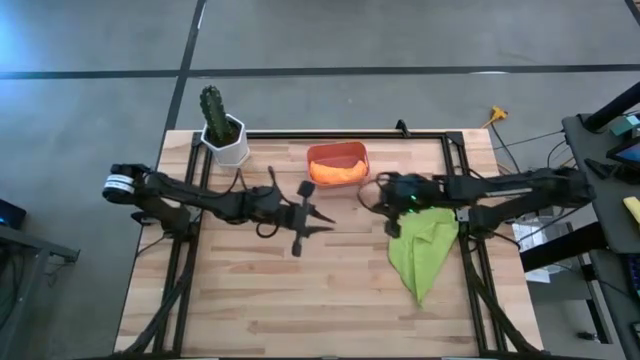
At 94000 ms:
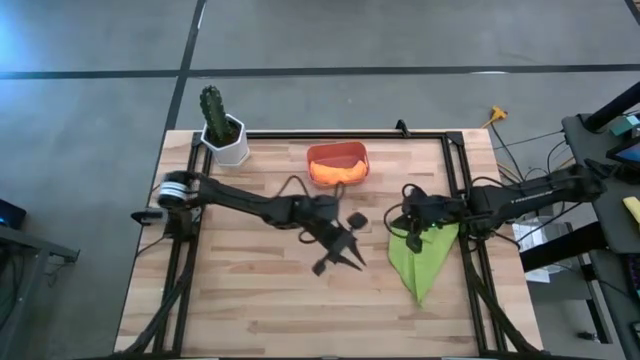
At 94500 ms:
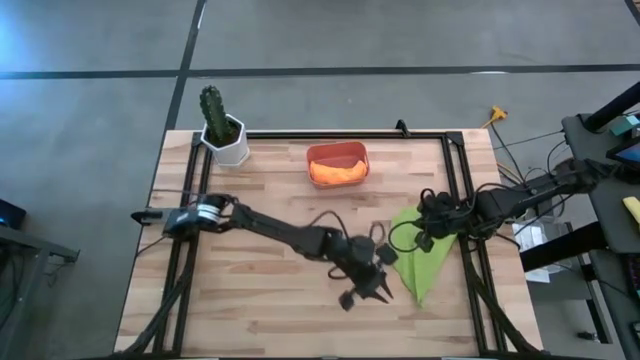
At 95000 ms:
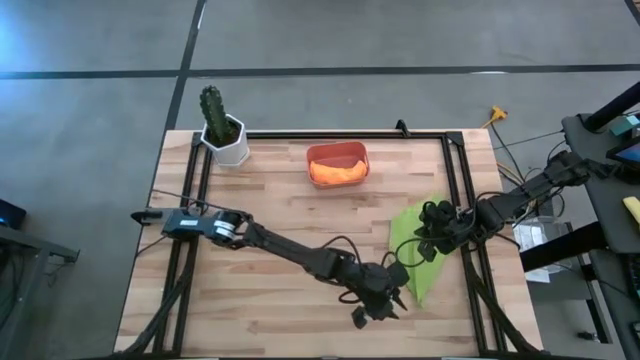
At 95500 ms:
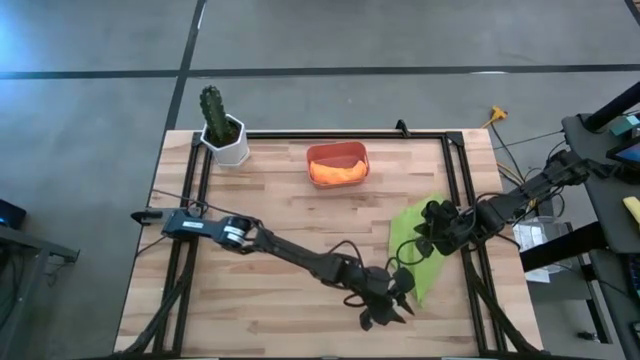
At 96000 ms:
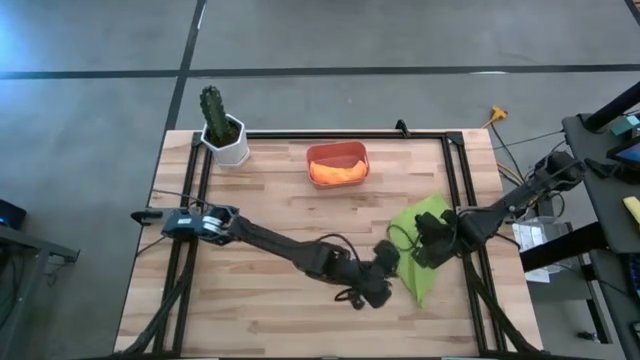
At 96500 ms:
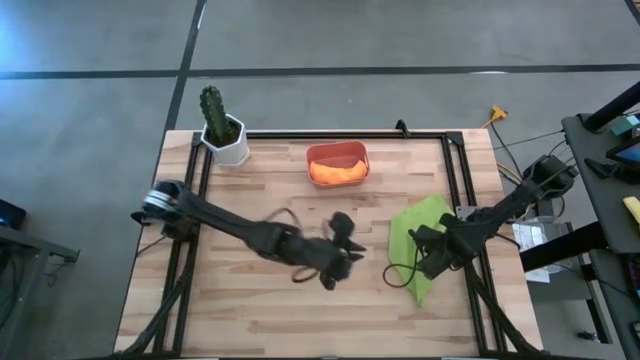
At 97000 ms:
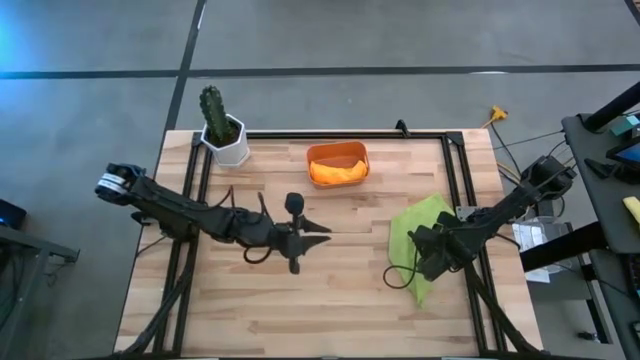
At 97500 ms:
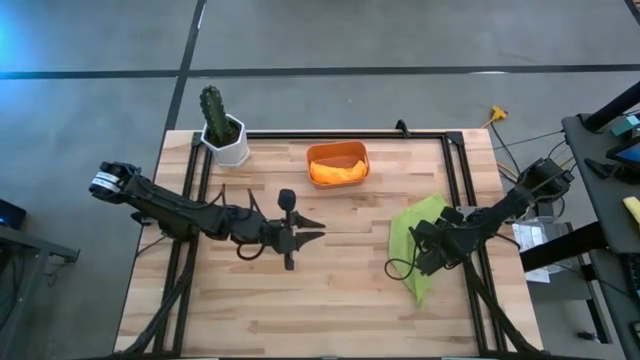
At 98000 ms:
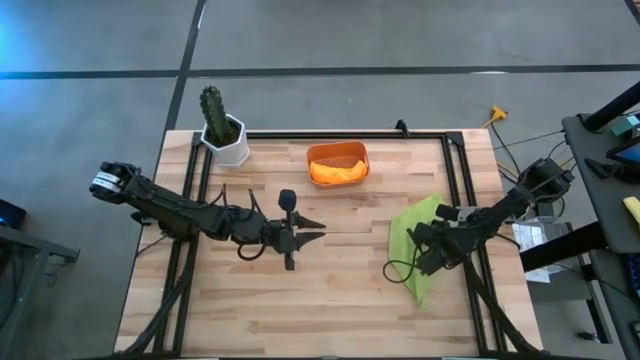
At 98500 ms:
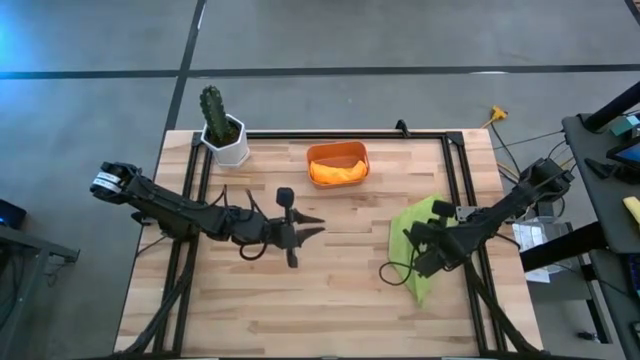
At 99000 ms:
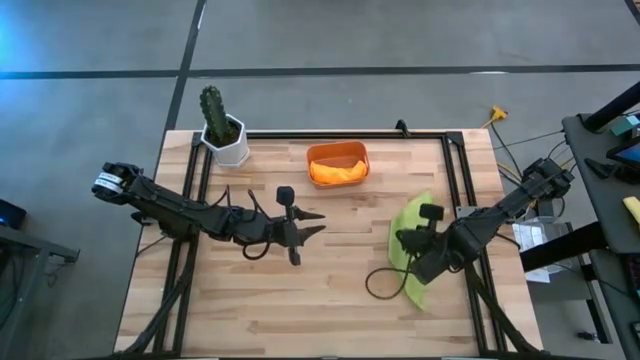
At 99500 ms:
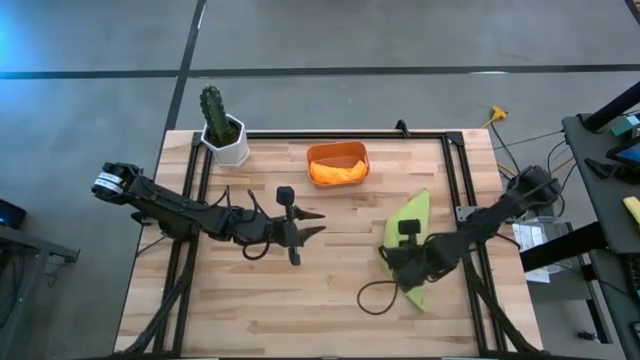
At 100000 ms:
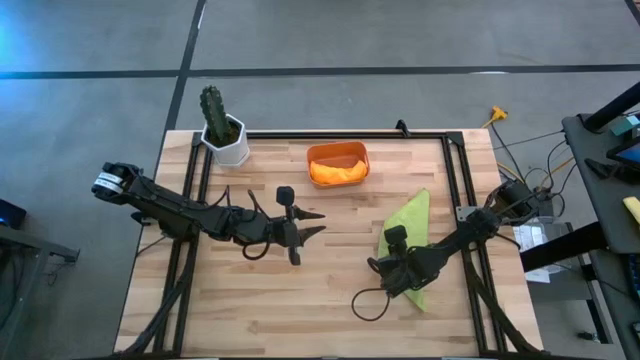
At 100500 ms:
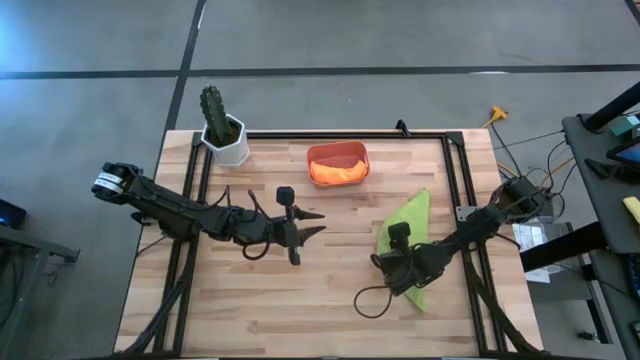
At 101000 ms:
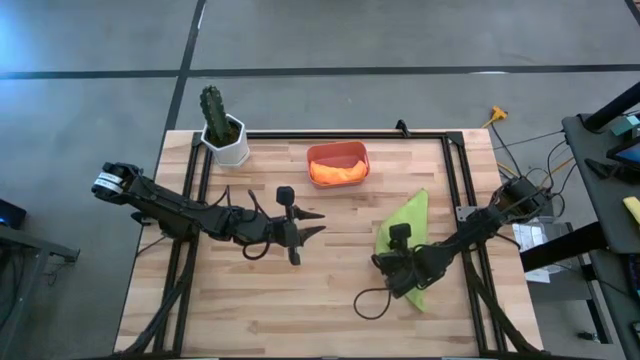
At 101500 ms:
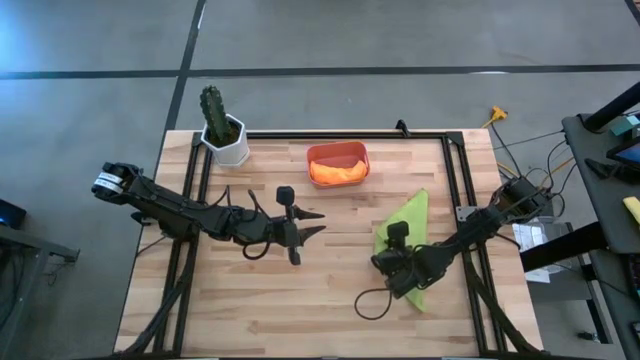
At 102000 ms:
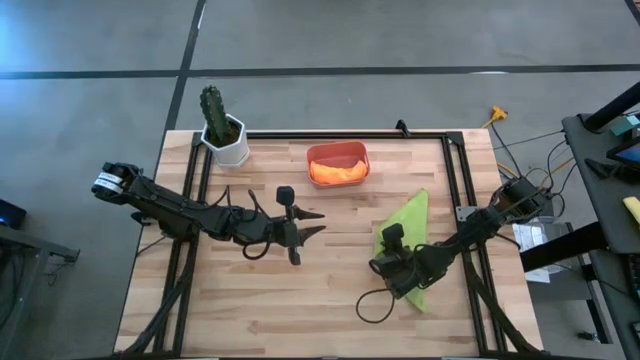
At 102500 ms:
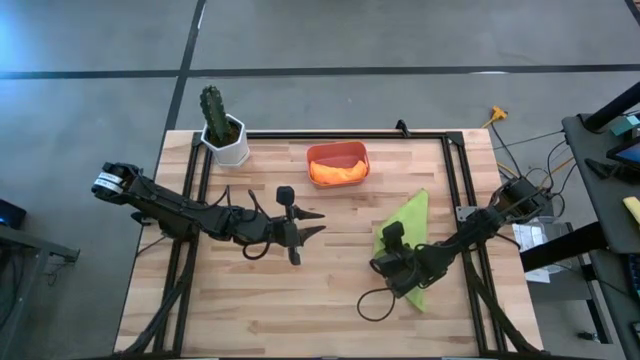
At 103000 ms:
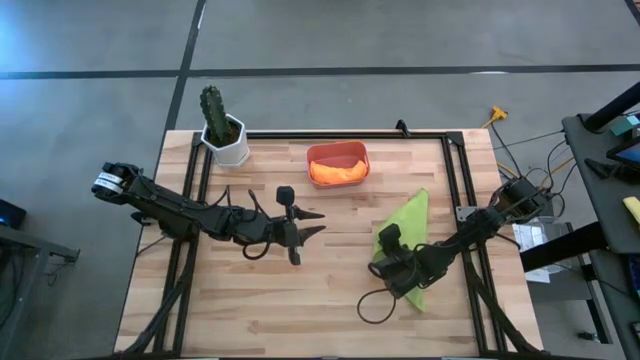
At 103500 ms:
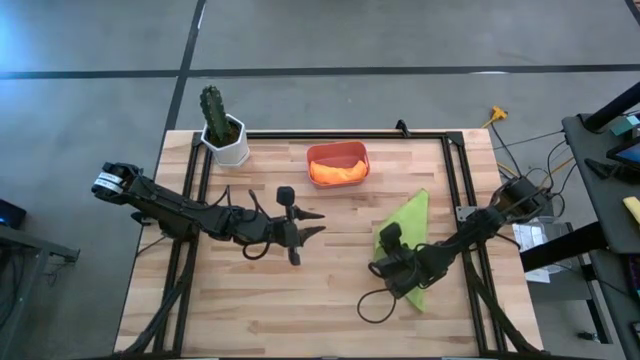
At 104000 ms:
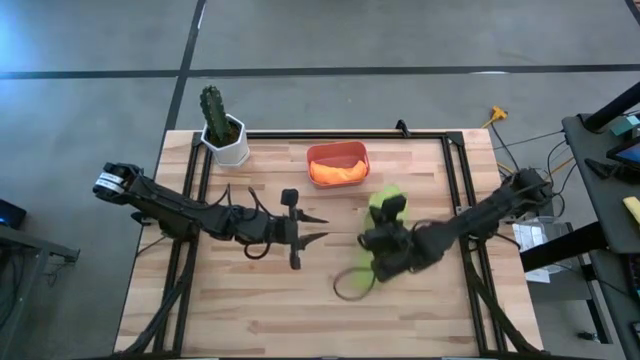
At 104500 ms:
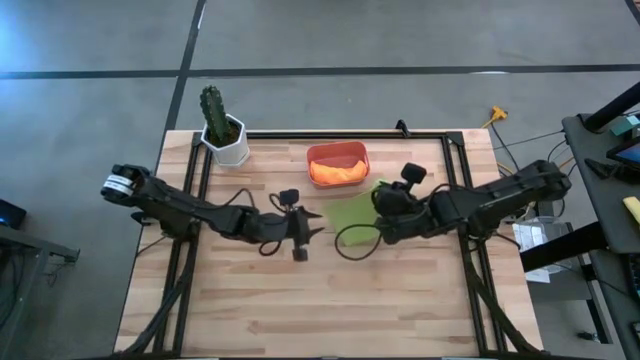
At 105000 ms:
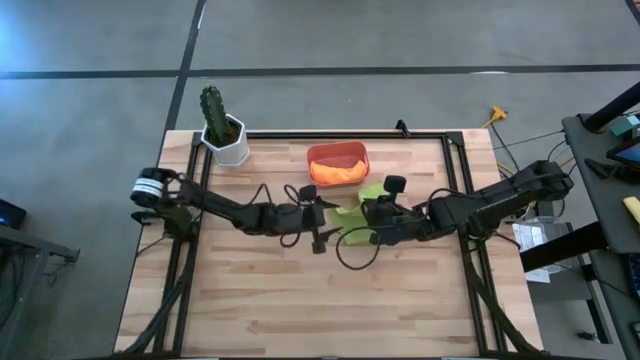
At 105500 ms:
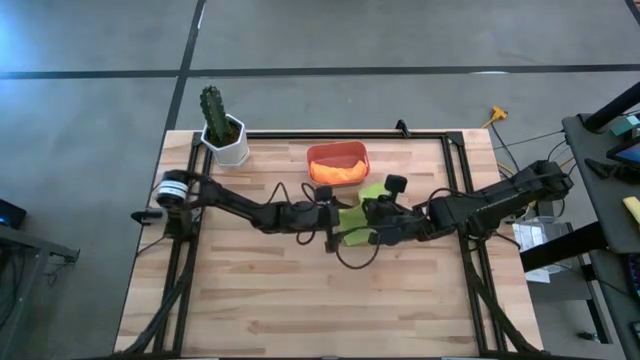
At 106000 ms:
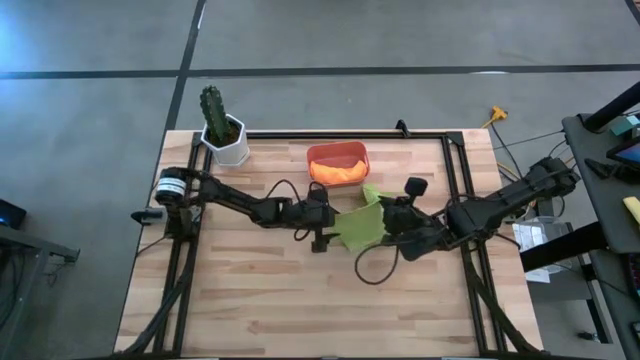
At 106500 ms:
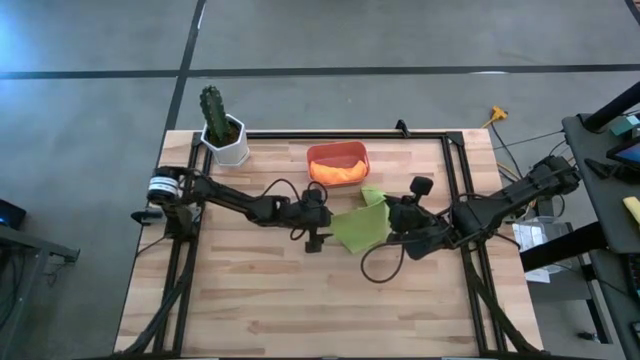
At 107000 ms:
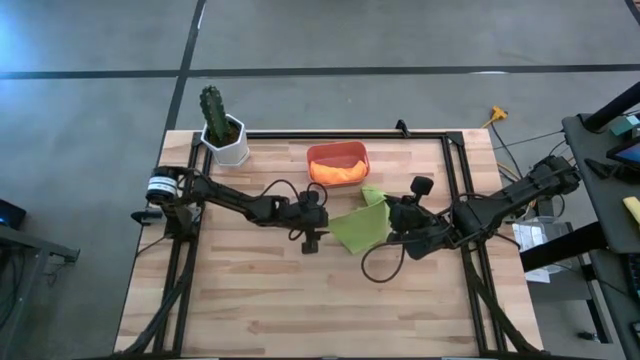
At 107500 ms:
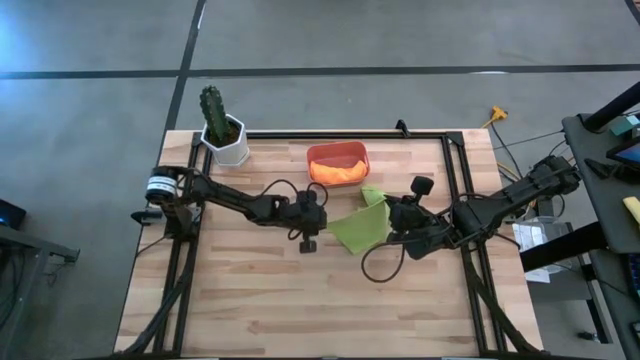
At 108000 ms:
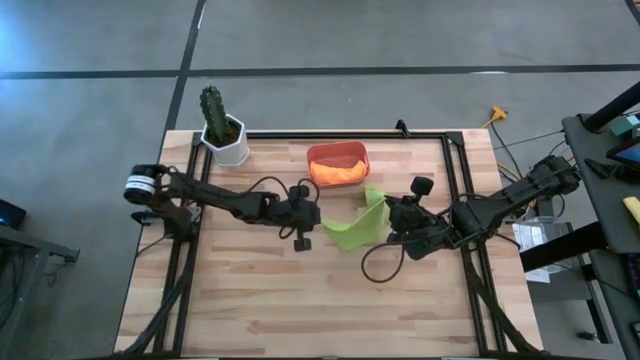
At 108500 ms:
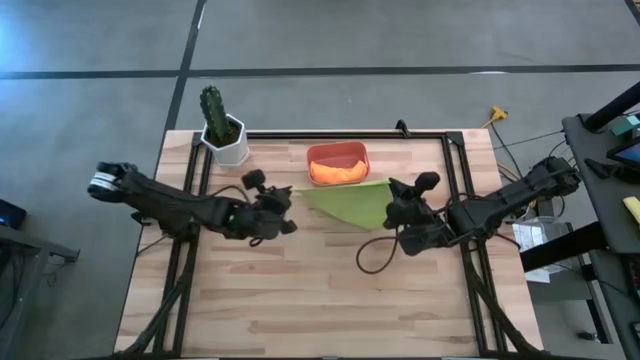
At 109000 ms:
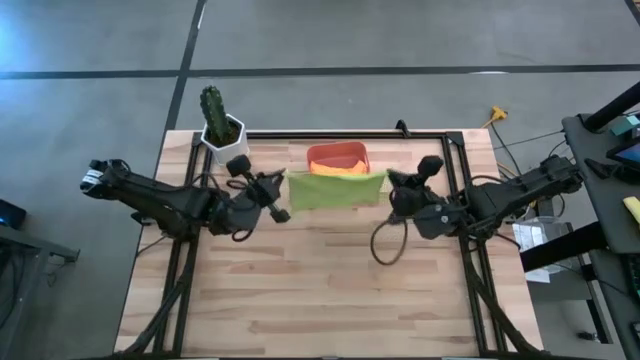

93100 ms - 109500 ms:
Task: Roll microfiber towels into tight, uniform cylinder then place into a basket
Fold the green microfiber cloth

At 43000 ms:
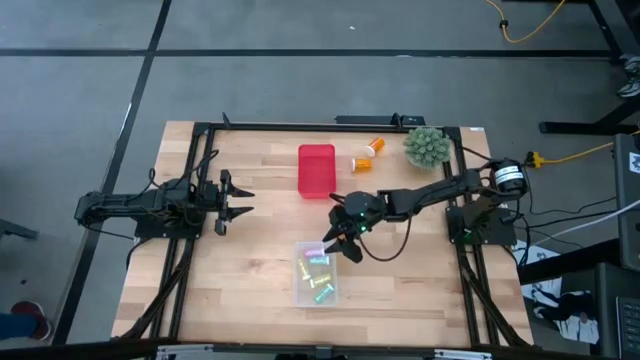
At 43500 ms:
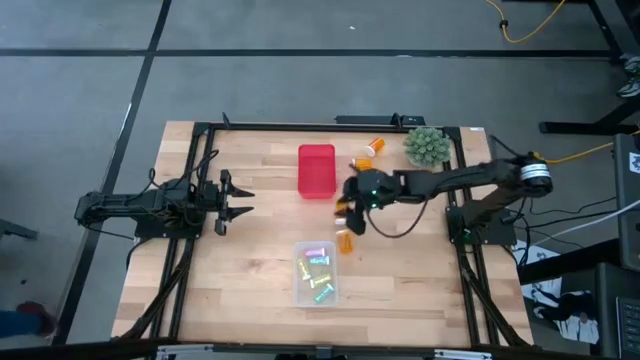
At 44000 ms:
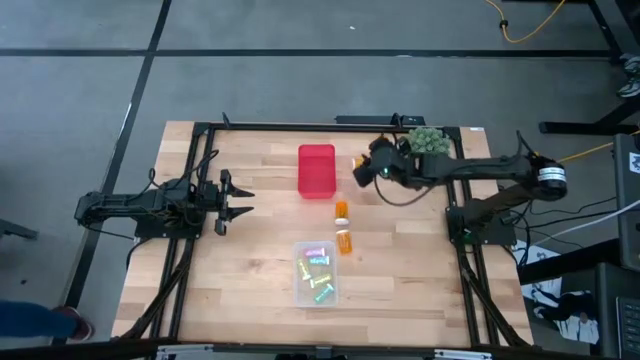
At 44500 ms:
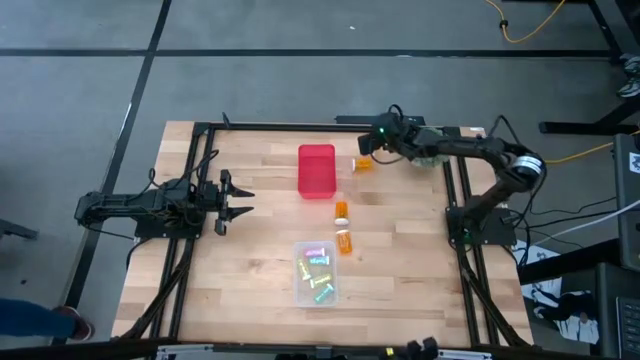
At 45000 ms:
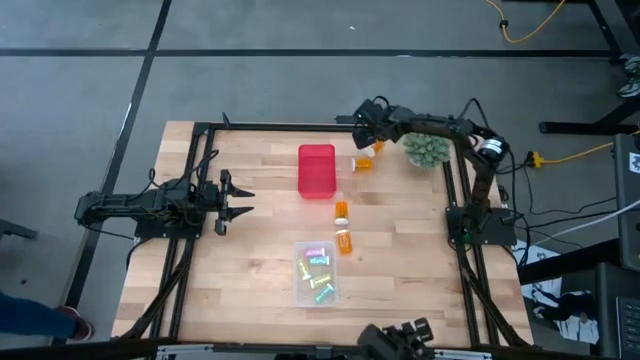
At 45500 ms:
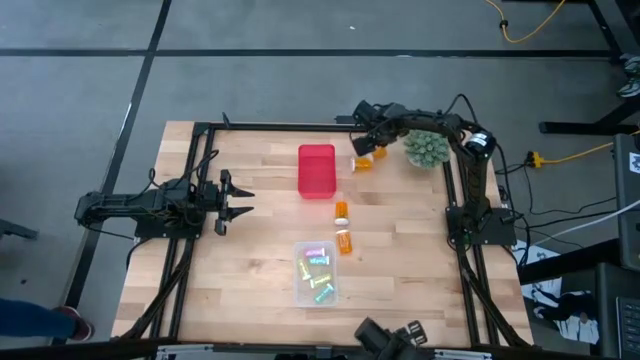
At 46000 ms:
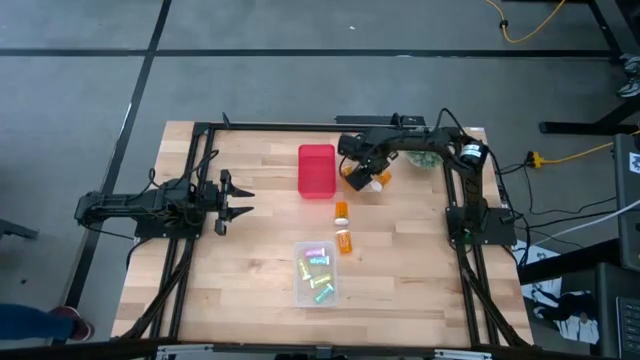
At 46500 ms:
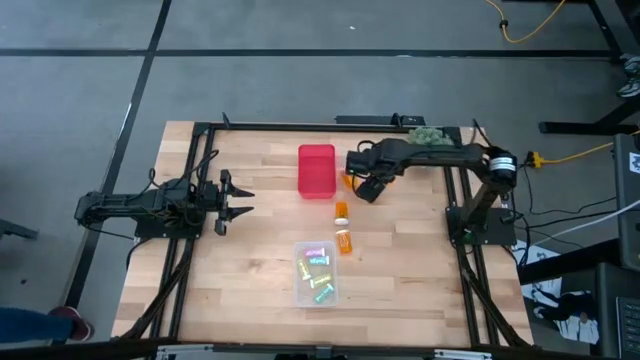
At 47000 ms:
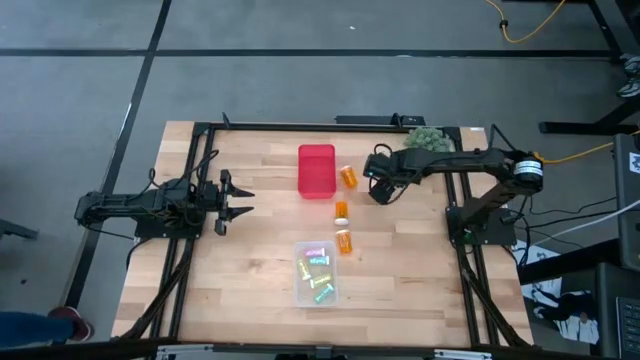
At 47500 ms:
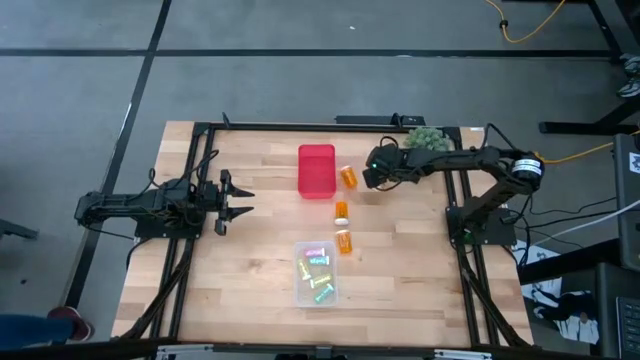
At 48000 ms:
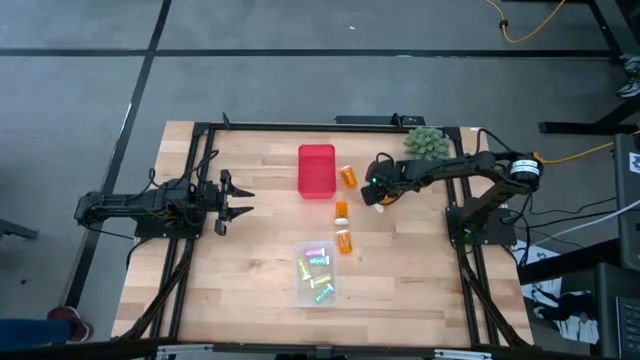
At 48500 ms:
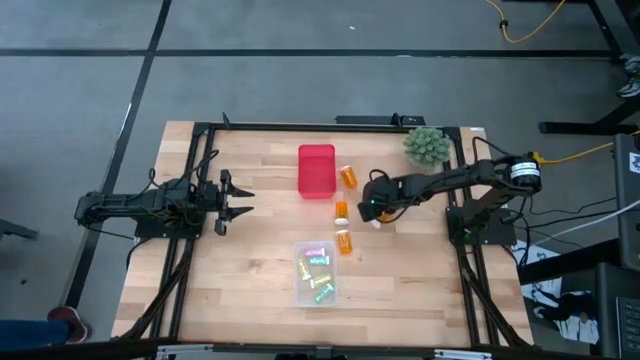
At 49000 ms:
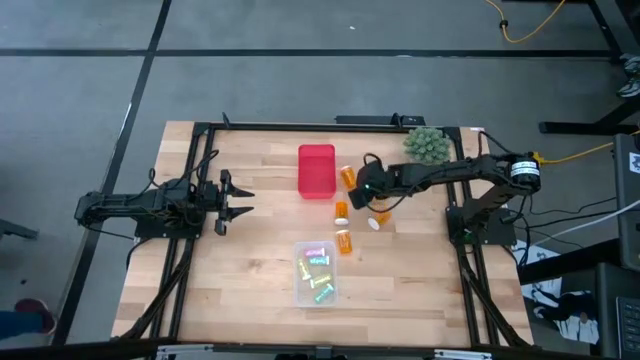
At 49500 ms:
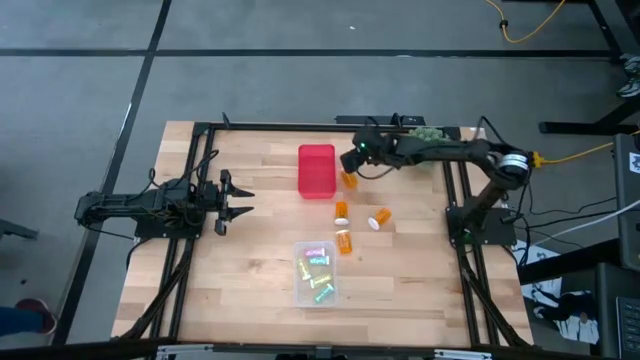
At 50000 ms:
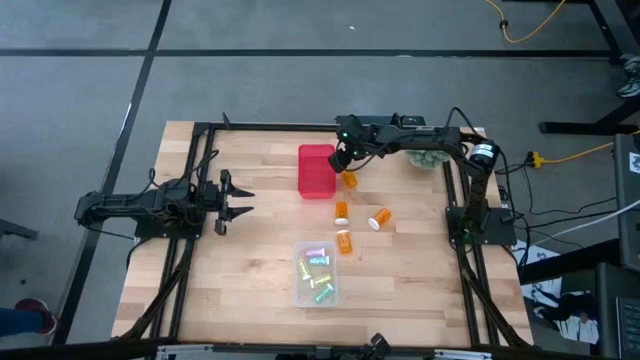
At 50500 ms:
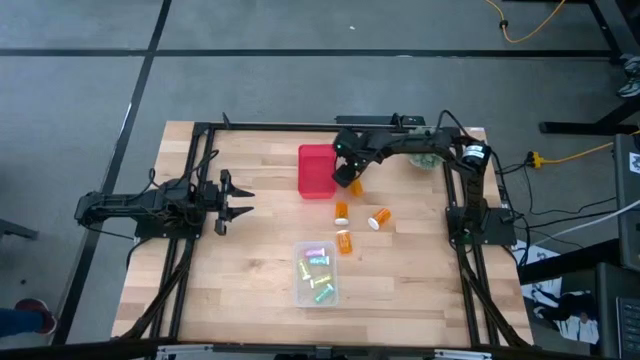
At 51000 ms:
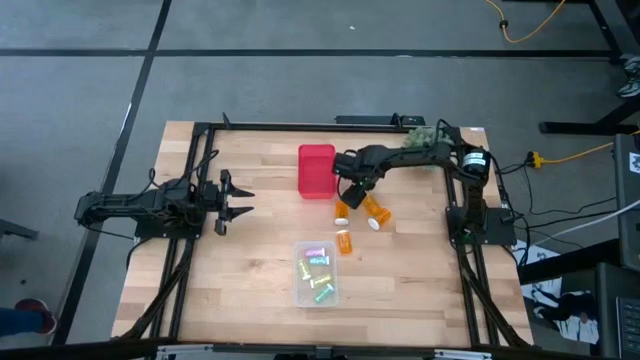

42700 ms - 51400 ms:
Task: Pick and place medicine bottles into bin by pill shape (circle, oval)
Move the large orange pill bottles to the center of the table
